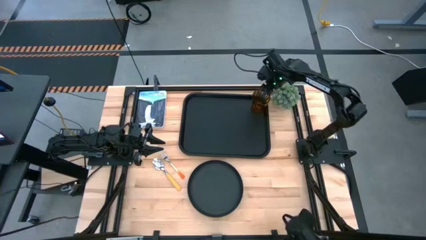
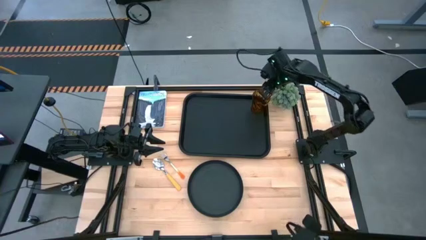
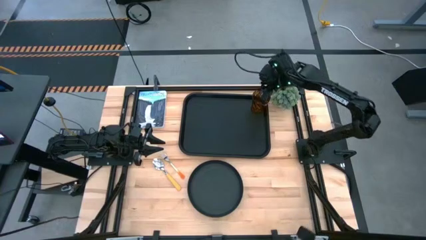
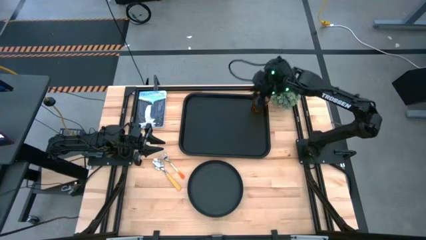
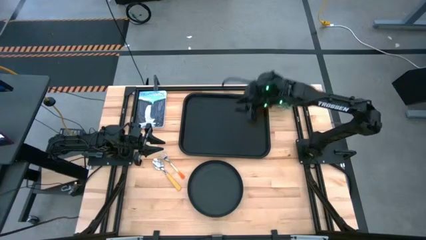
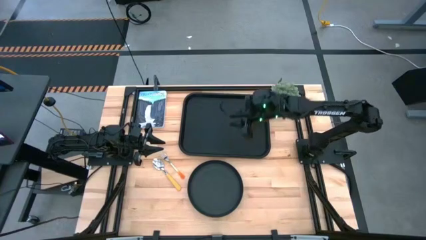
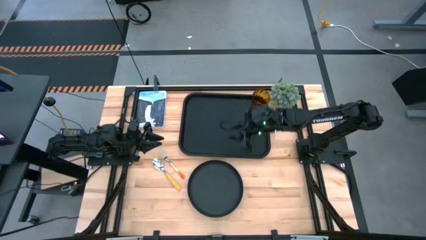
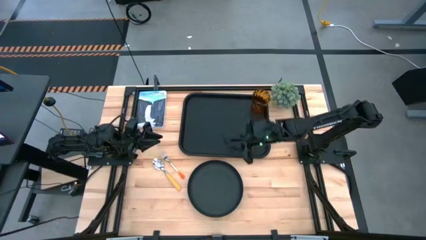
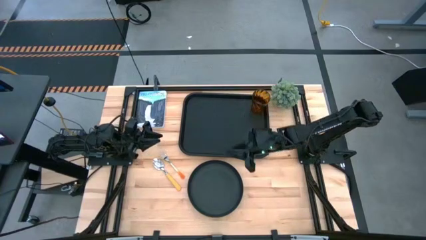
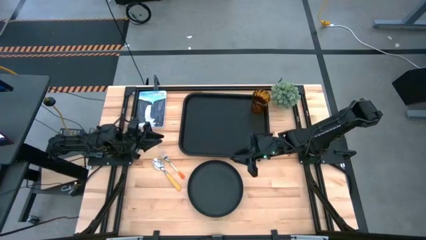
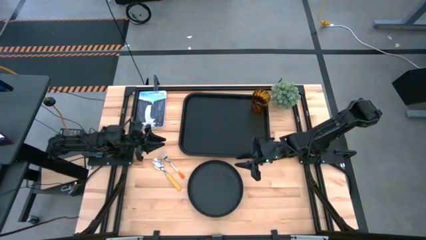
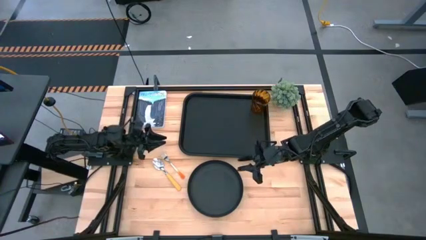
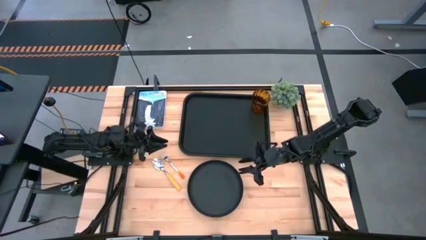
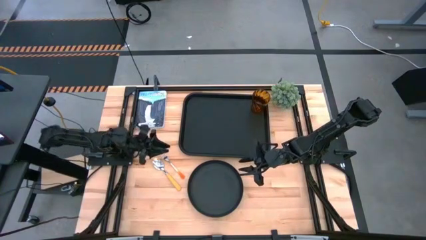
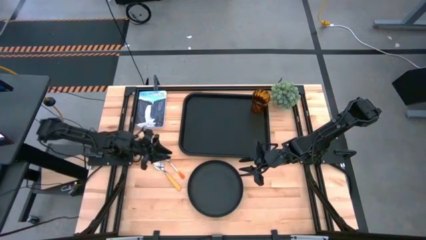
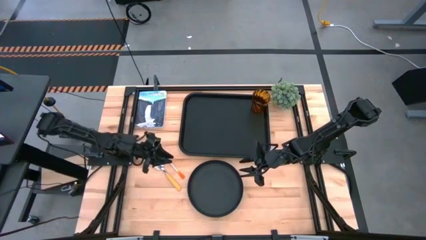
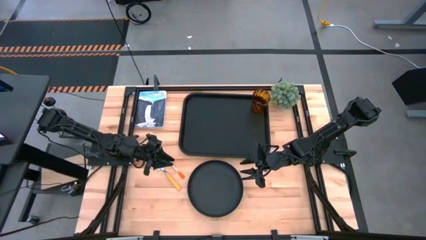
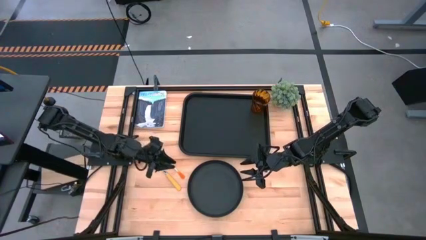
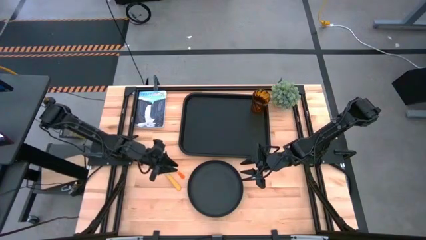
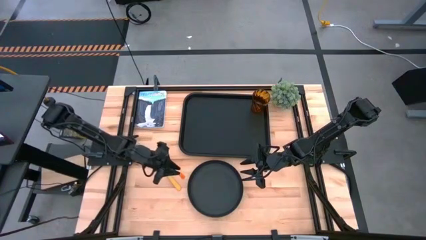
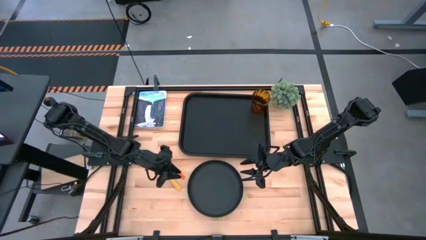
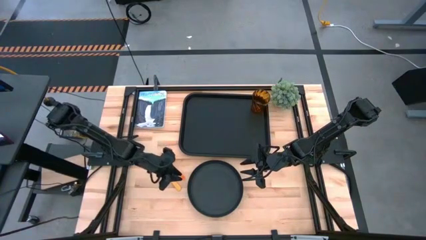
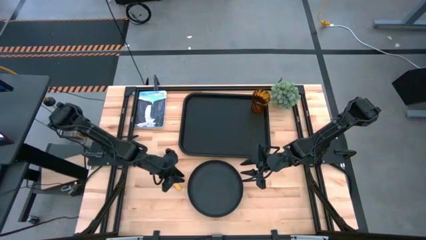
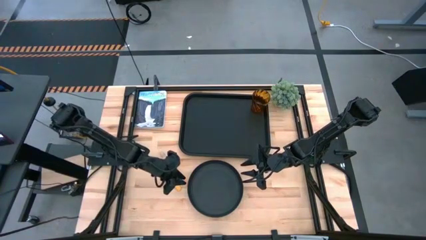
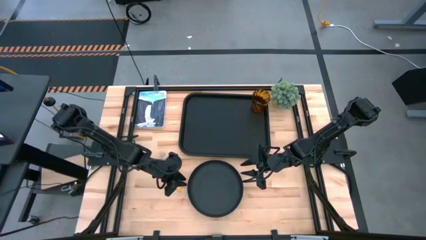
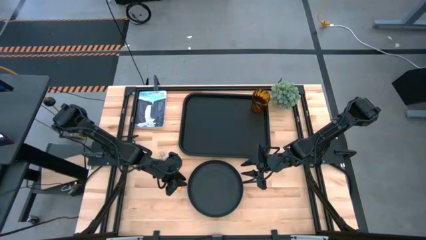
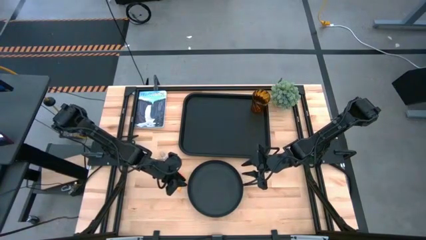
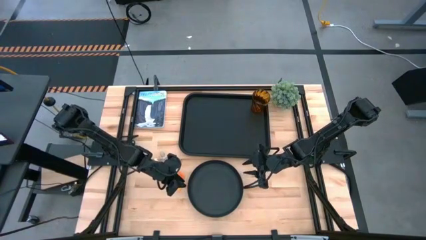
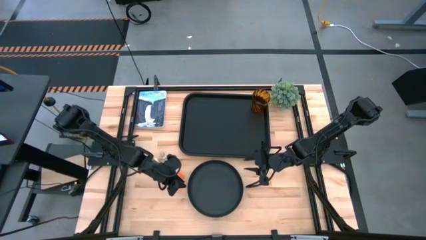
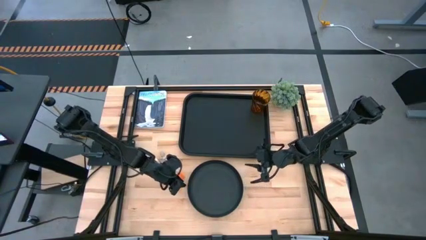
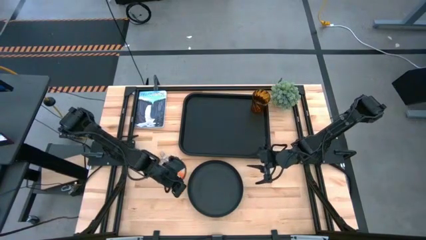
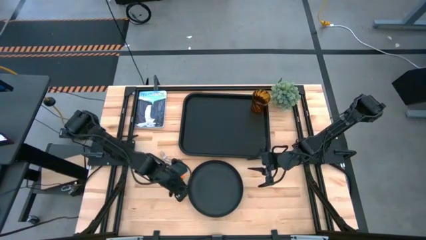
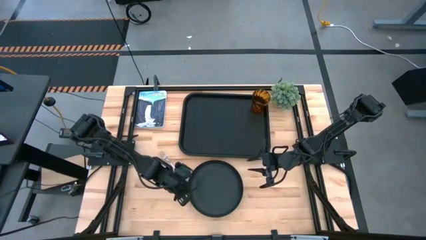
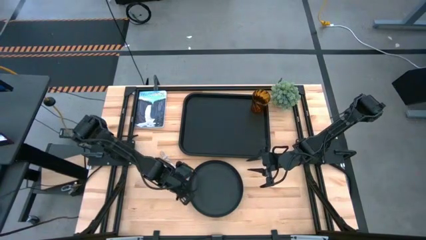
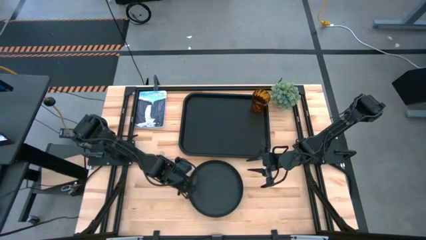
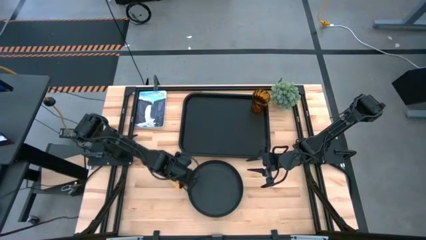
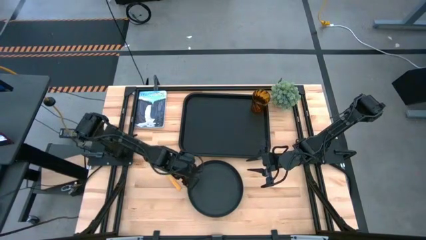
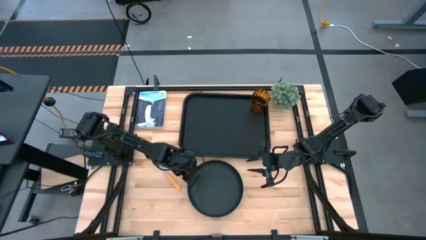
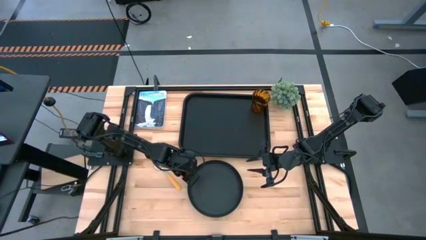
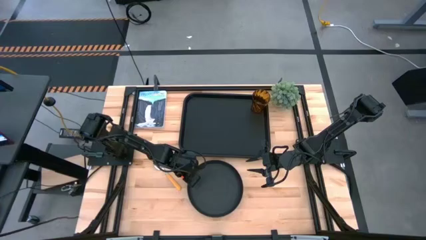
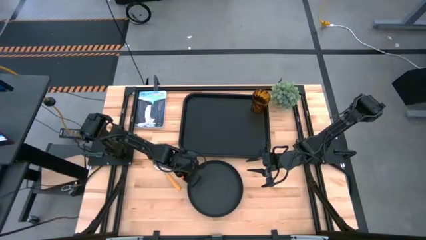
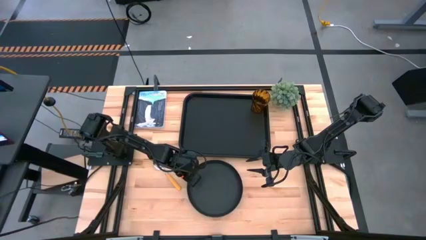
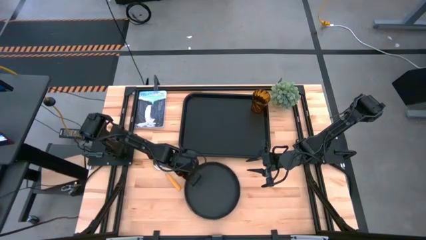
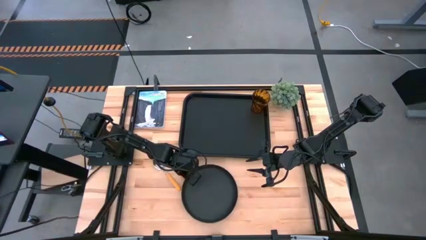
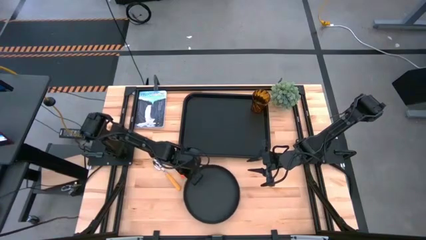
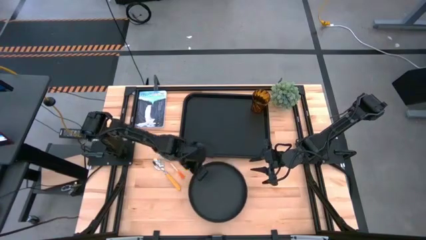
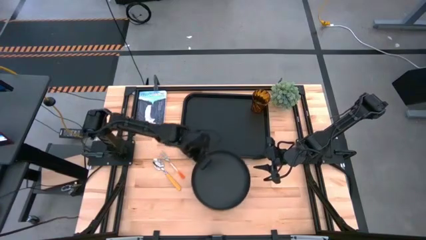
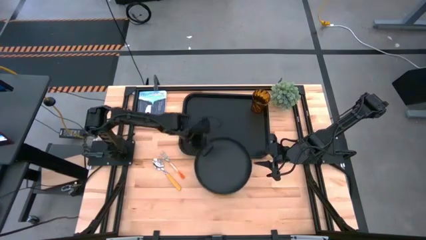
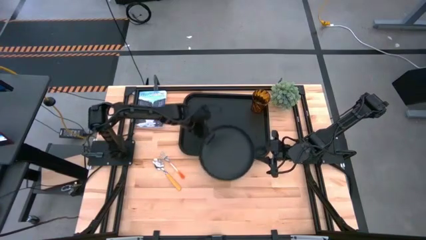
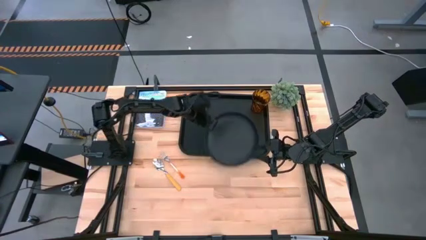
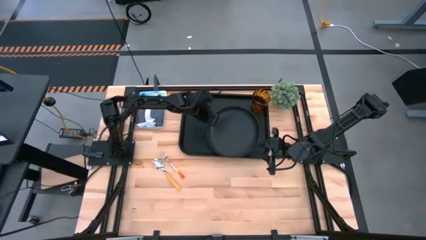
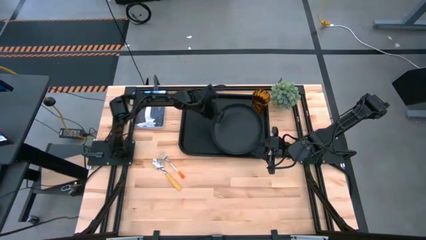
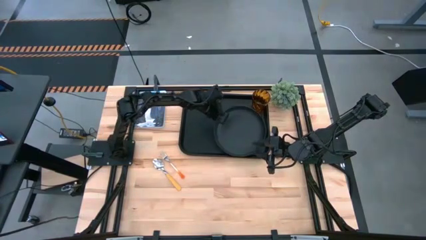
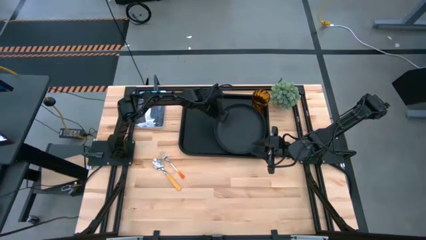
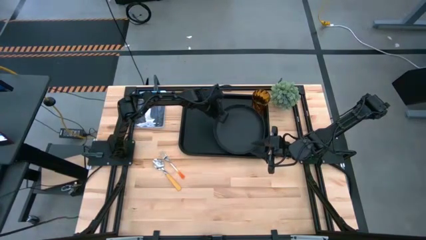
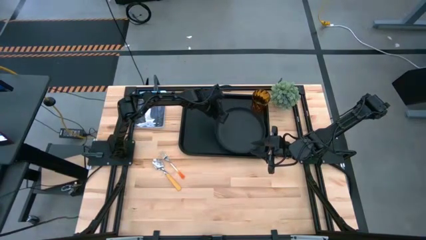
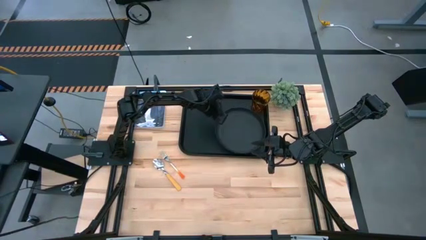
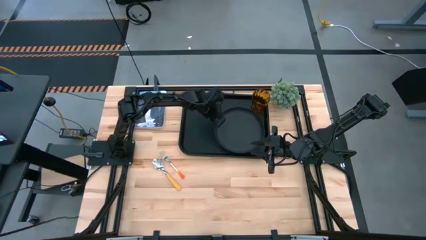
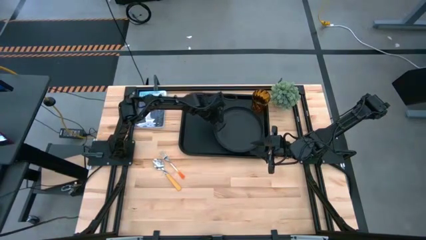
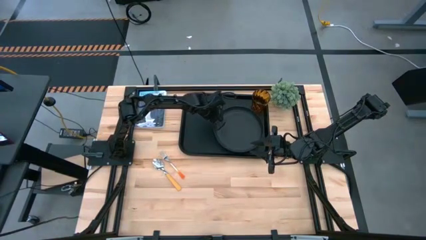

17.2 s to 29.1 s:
Task: Pick and place plate/cup/fork/spoon on tray
Put the black plate on the black serving tray to the bottom of the brown glass
